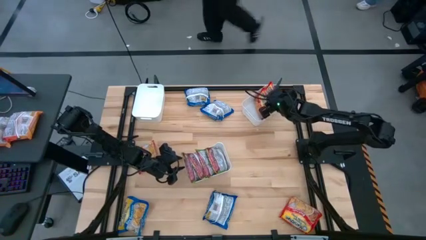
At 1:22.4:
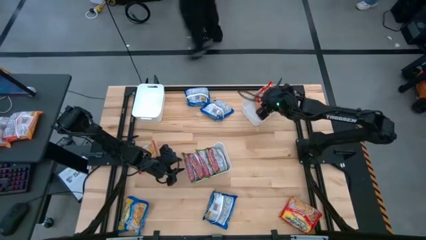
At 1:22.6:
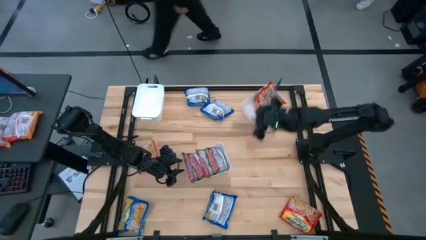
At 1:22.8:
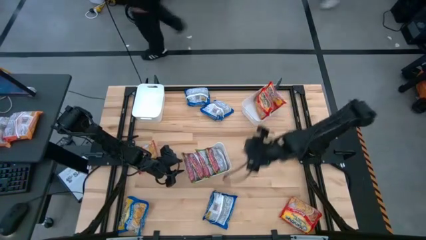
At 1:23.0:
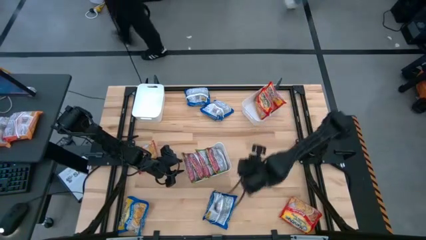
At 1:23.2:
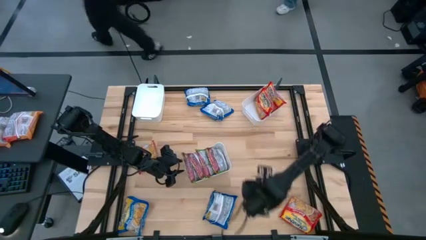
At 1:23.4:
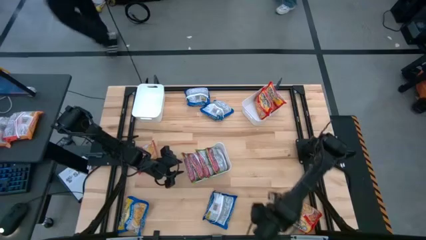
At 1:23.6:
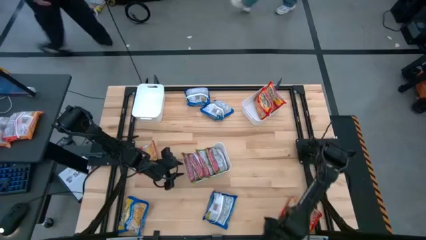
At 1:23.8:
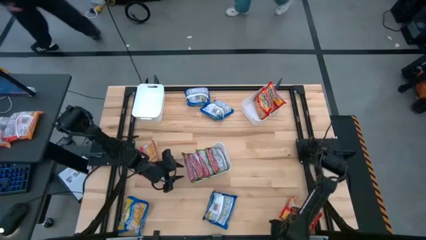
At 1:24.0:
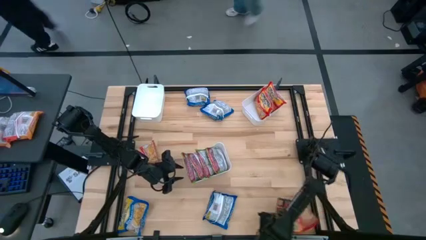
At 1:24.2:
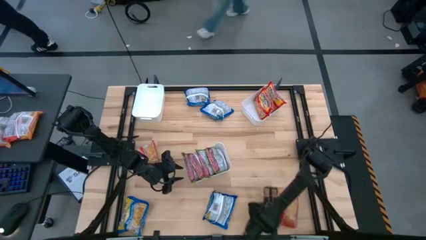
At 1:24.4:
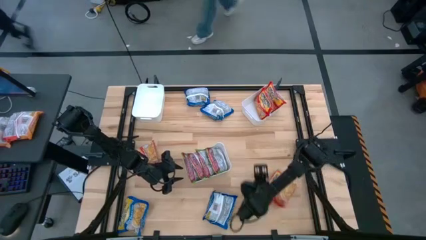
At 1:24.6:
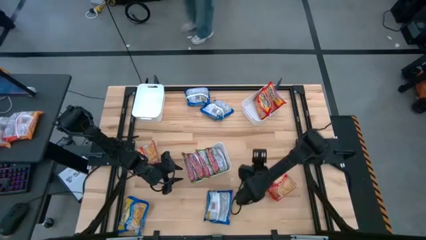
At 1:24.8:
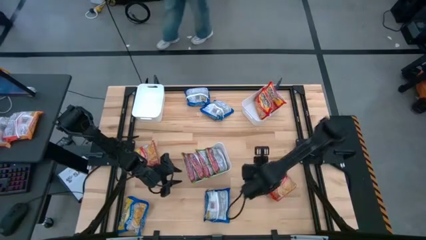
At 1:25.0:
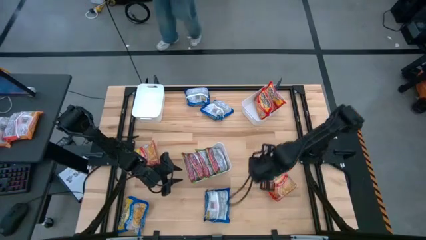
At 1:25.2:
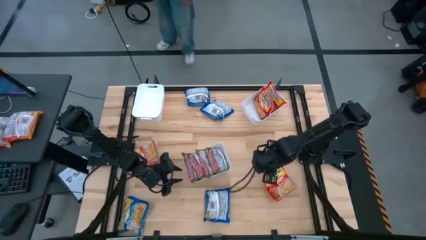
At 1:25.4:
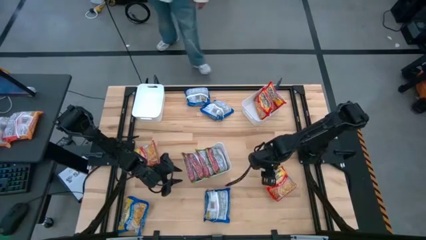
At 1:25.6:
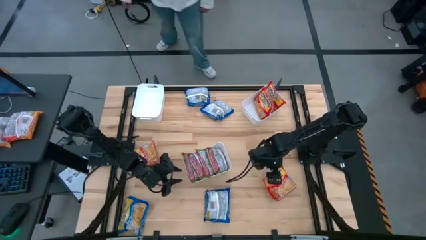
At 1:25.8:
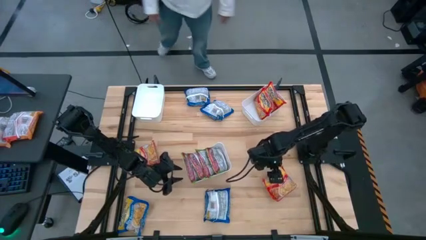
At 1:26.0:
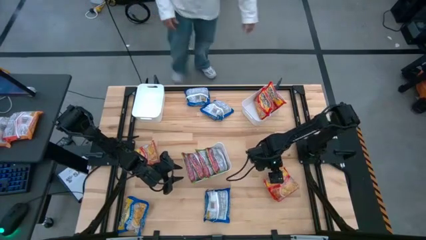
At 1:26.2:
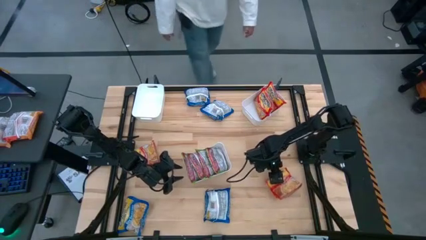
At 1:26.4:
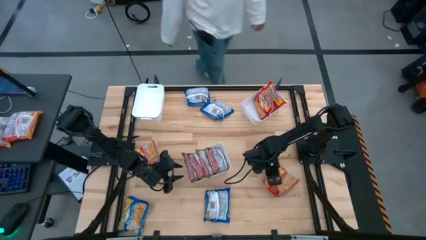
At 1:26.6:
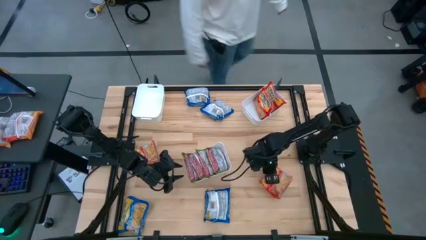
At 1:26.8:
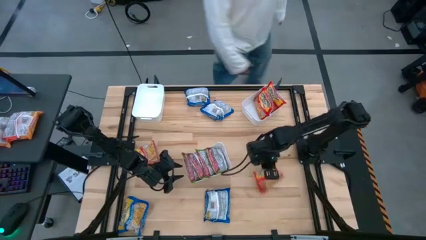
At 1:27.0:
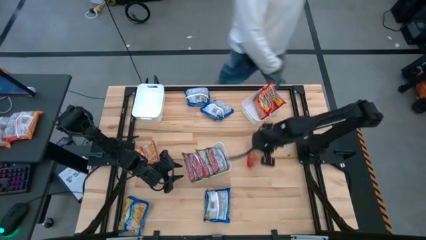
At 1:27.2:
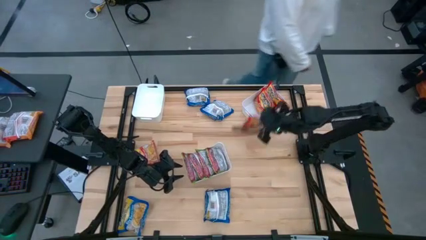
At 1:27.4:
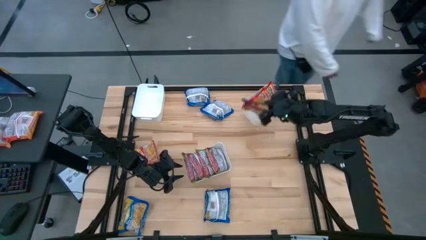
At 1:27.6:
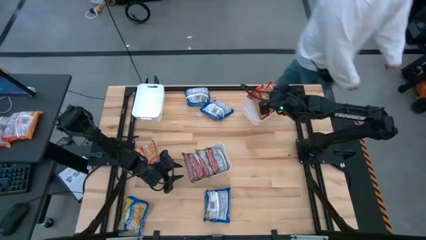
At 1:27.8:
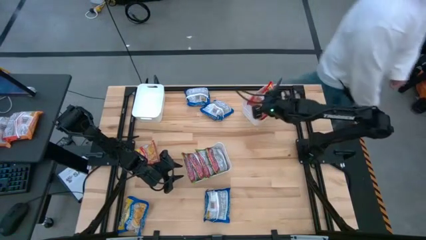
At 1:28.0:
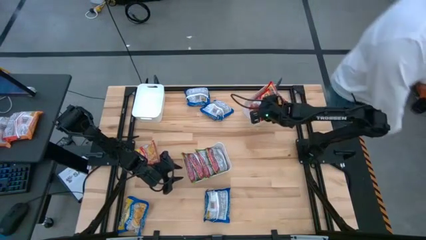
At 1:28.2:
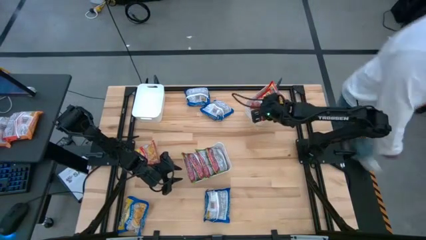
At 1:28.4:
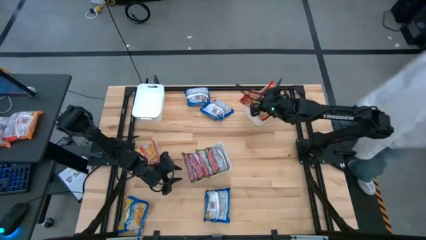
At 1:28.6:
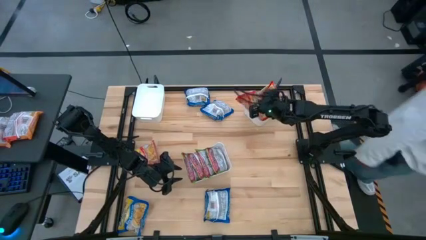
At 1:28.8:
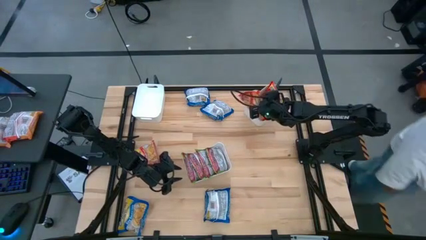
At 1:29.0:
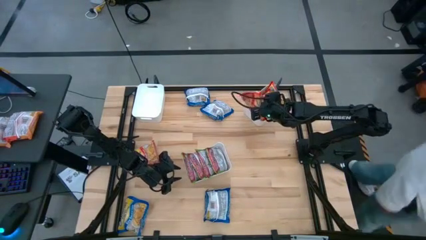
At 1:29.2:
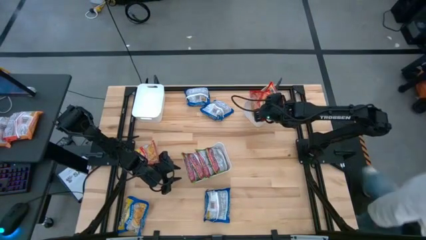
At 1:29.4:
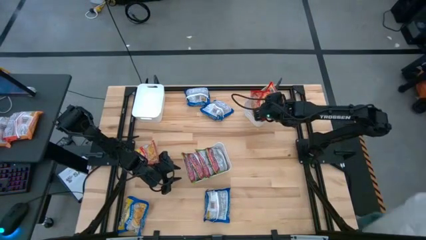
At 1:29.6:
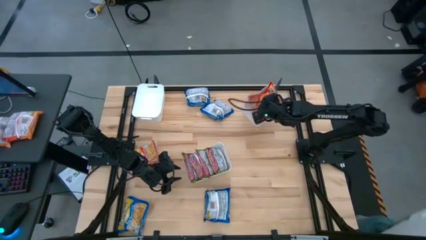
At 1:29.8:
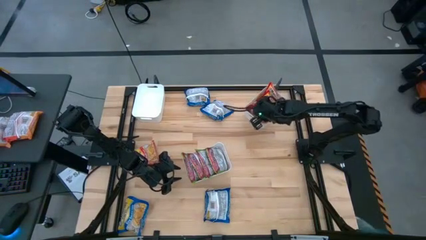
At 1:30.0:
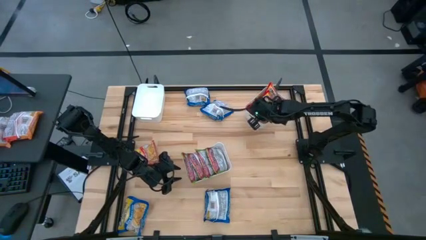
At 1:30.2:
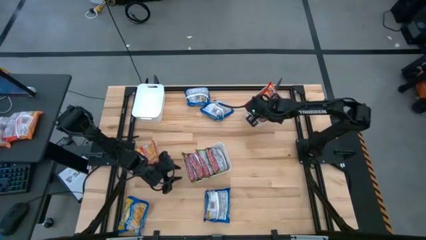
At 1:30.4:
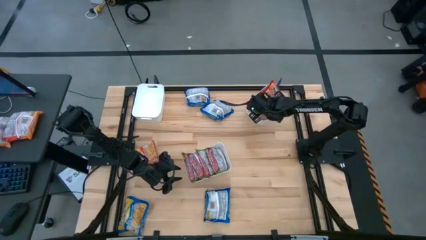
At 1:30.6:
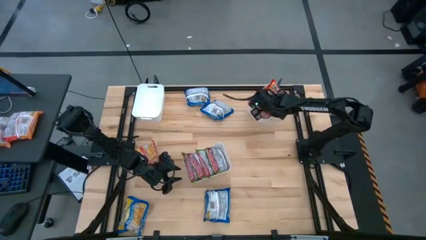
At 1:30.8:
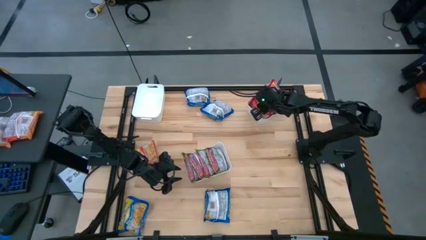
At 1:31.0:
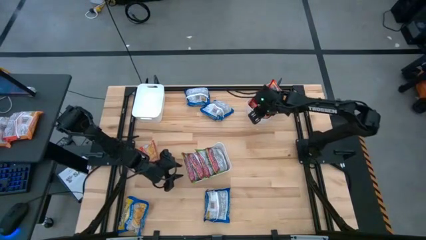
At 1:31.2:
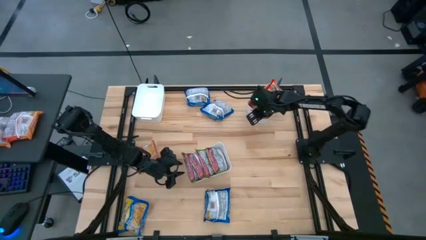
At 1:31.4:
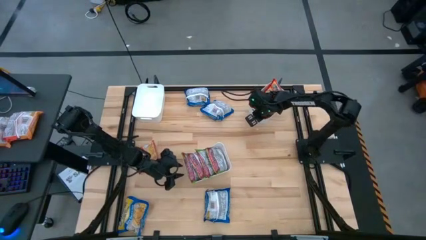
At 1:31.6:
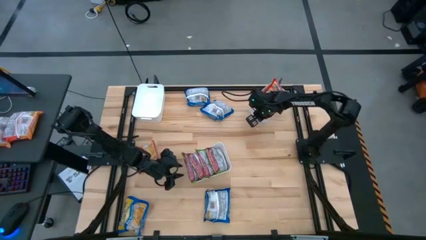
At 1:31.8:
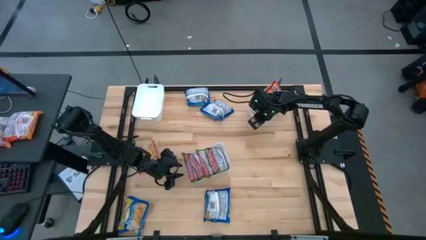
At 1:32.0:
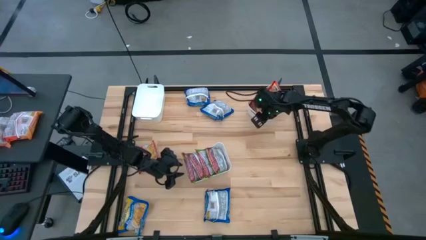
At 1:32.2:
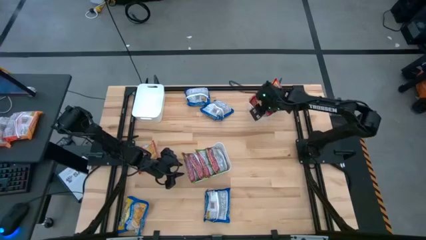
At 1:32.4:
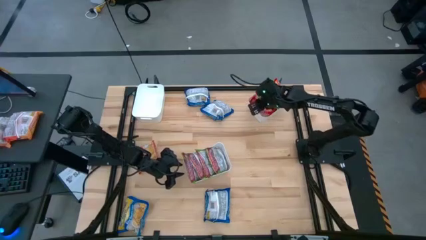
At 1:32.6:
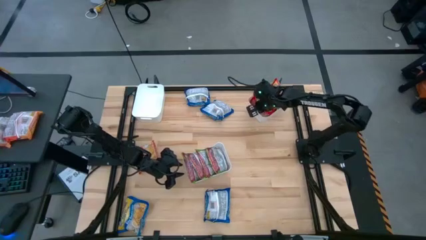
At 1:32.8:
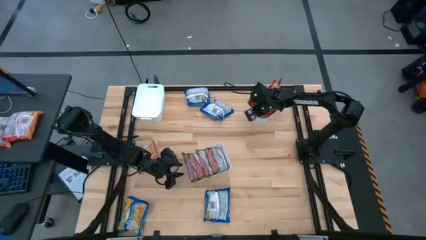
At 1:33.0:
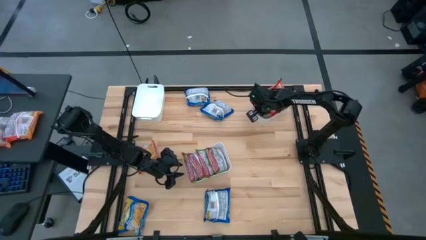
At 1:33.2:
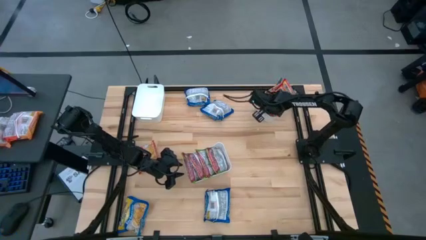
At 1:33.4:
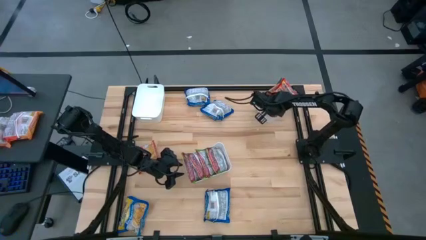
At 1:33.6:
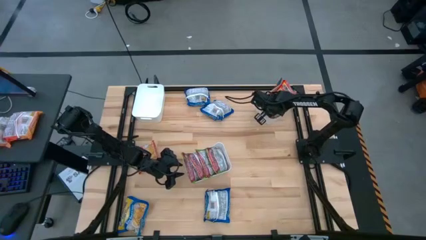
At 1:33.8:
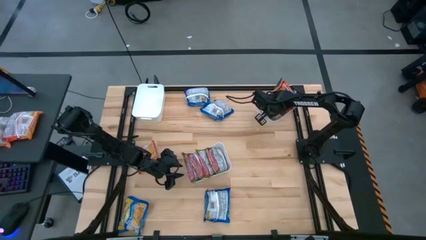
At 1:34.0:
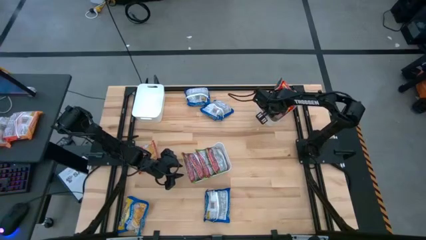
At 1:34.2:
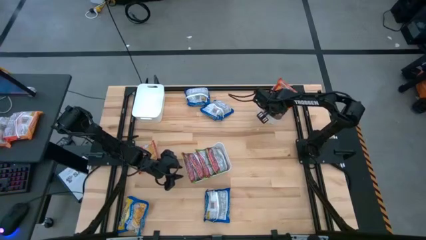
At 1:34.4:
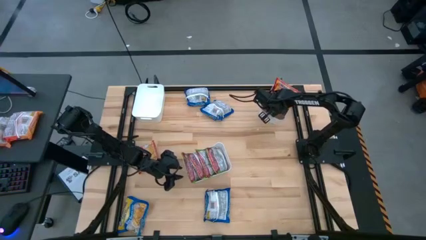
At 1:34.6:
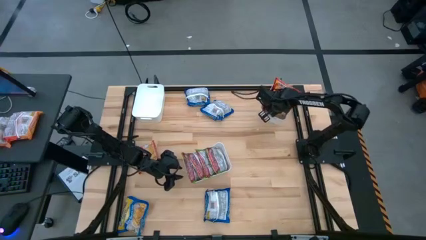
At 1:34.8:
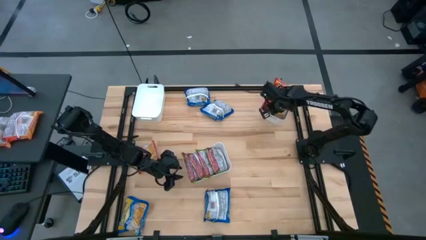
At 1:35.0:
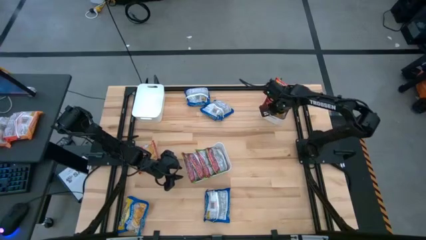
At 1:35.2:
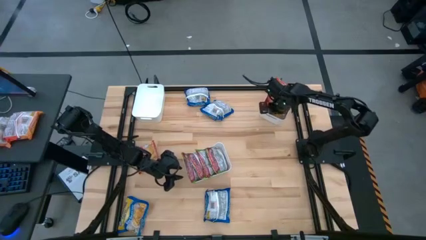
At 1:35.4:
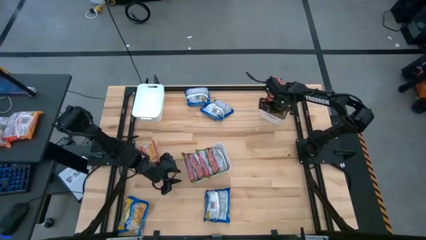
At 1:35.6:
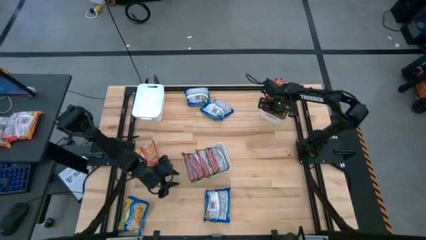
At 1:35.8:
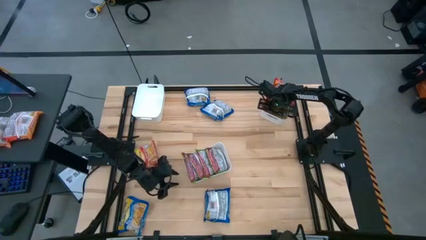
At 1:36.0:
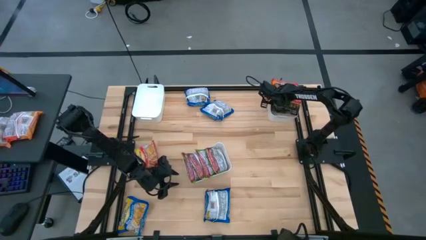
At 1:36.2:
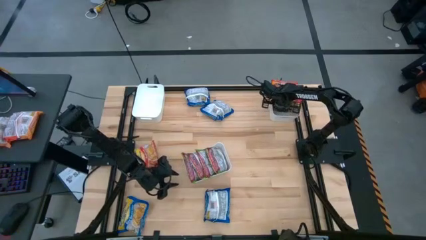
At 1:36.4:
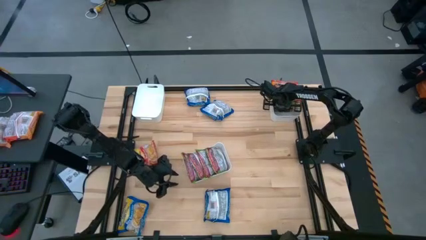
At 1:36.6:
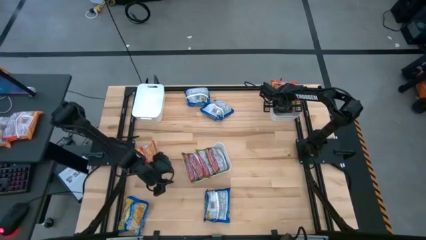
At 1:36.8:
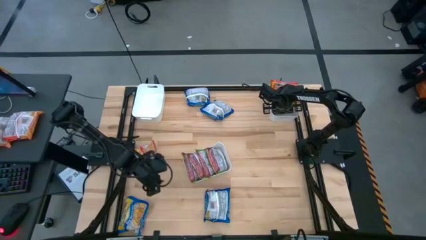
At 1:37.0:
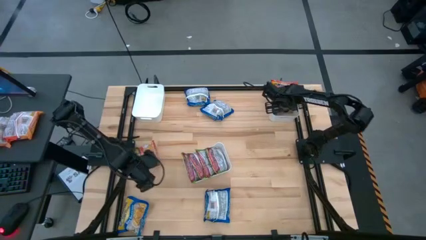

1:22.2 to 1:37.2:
Task: Sort Maruchan noodles
Put the orange noodle pack into the top right white bin
